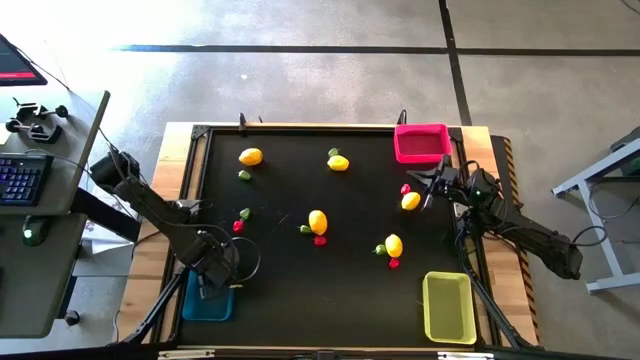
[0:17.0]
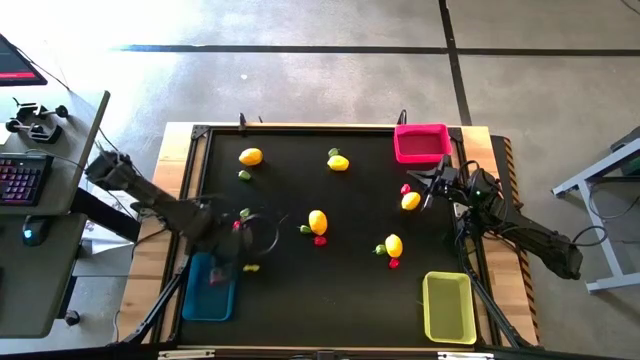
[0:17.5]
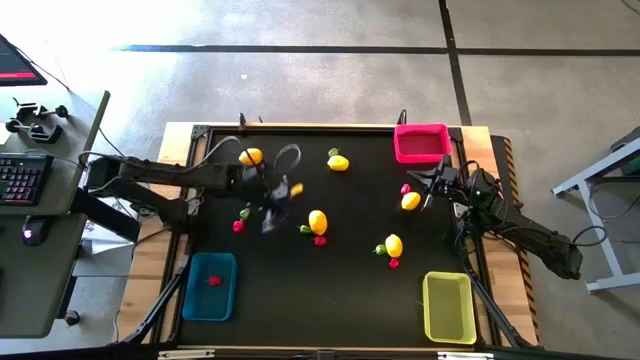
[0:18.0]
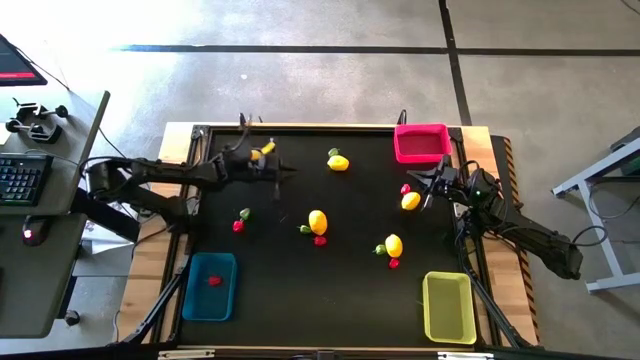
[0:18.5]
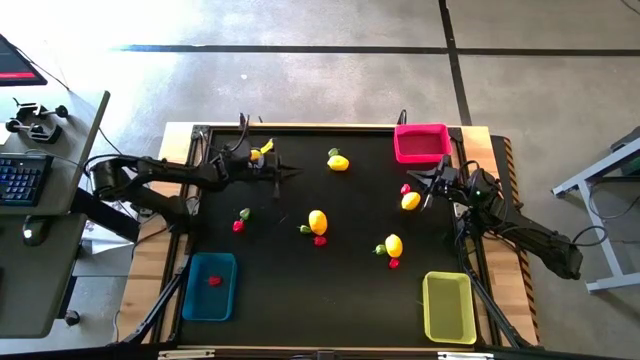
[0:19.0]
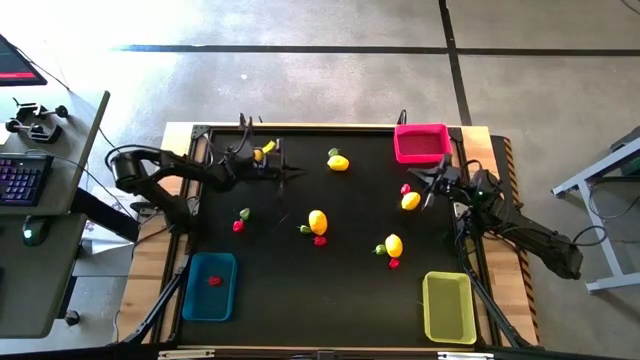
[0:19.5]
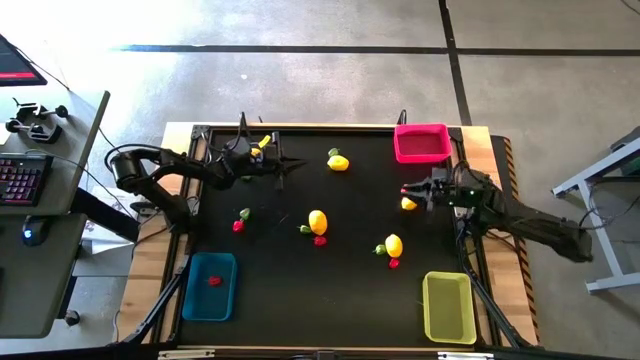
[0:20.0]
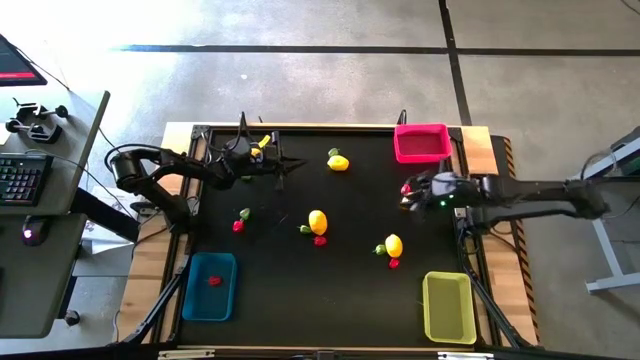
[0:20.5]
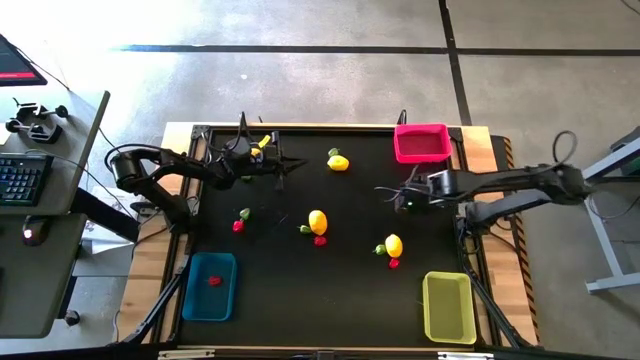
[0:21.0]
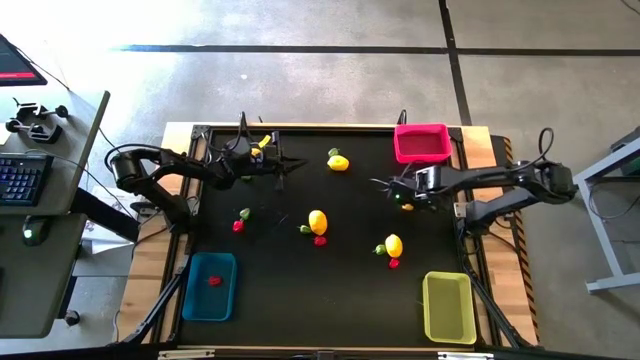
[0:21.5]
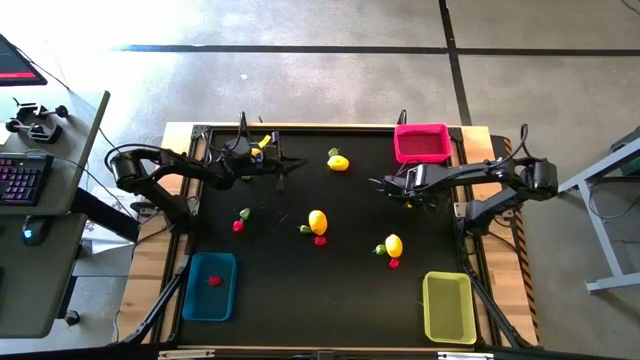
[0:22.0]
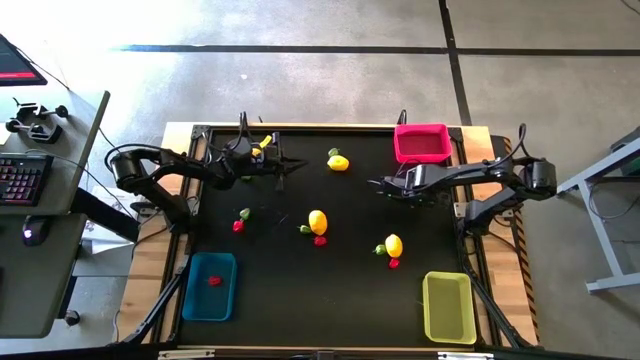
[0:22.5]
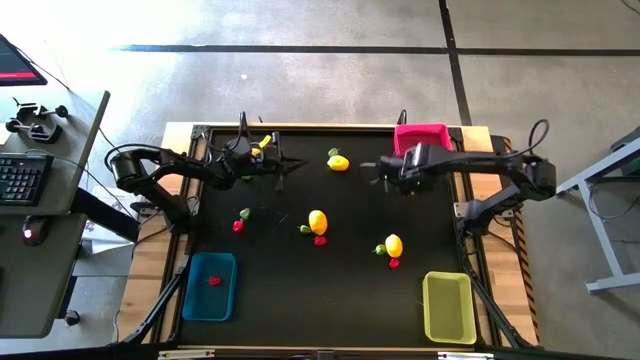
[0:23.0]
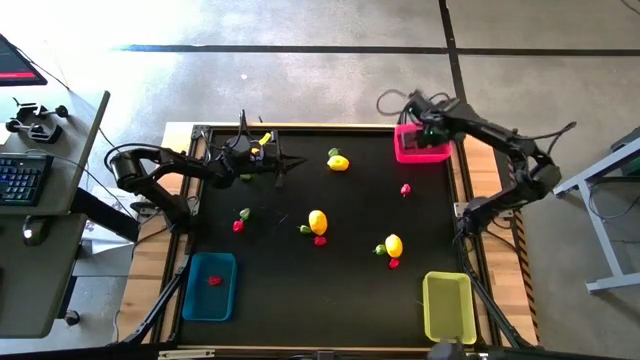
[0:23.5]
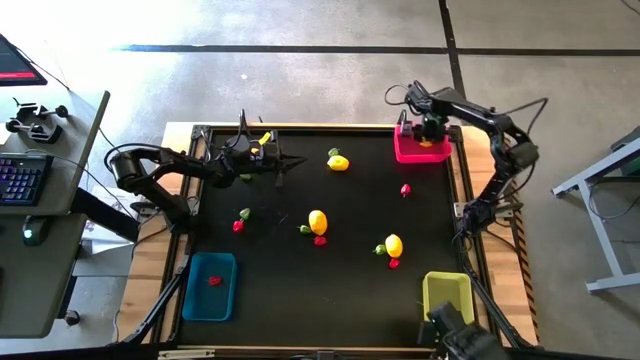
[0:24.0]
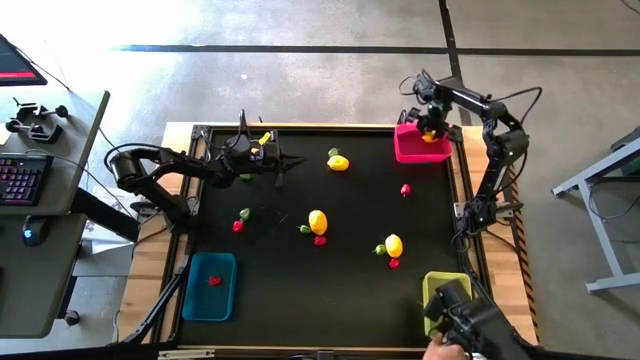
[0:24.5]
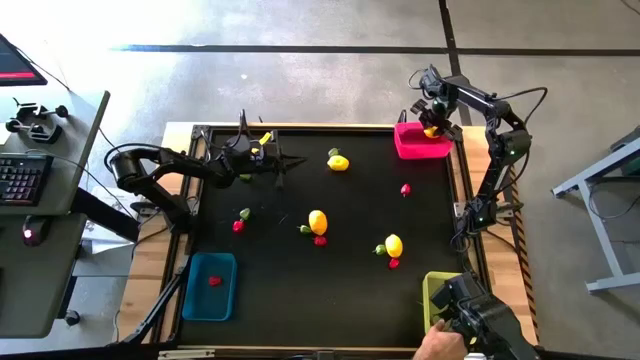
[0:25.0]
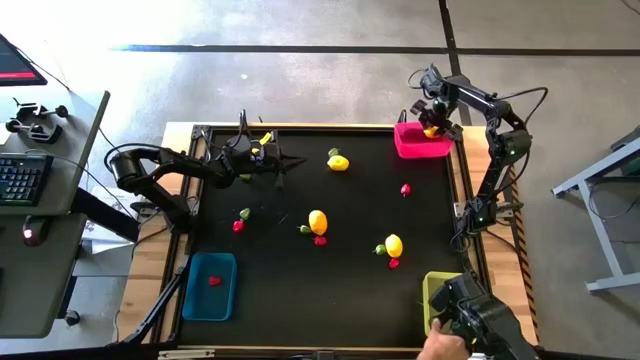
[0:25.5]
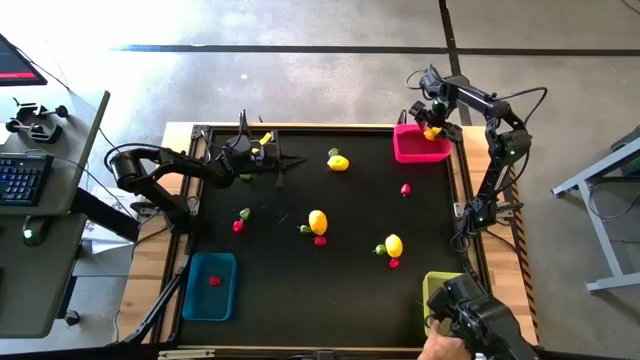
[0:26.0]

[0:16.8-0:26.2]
Task: Sort produce into baskets
Put the lemon into the pink bin

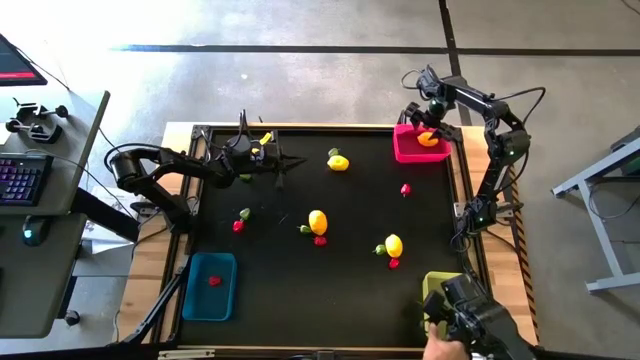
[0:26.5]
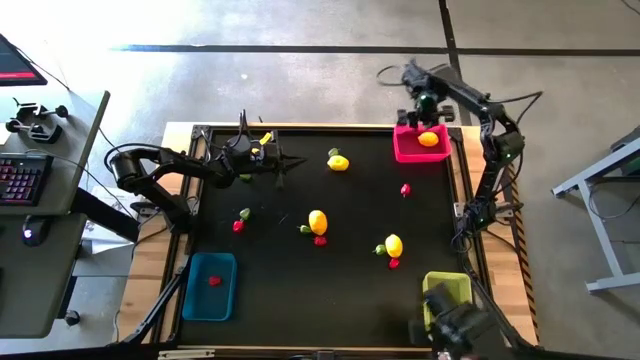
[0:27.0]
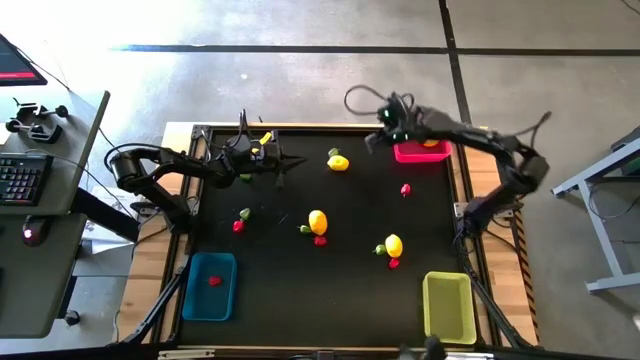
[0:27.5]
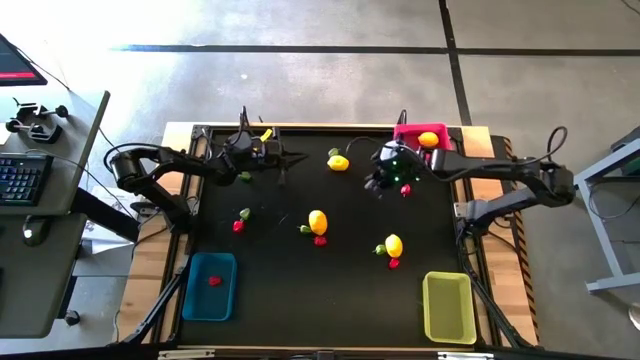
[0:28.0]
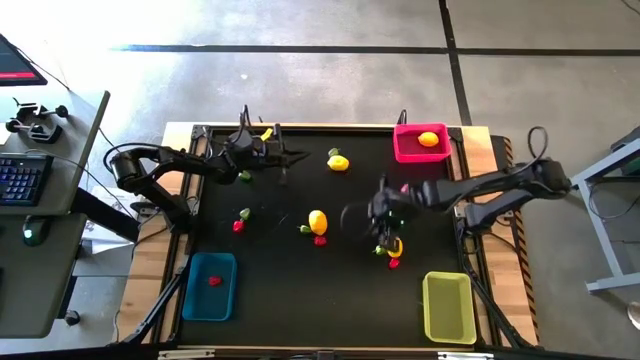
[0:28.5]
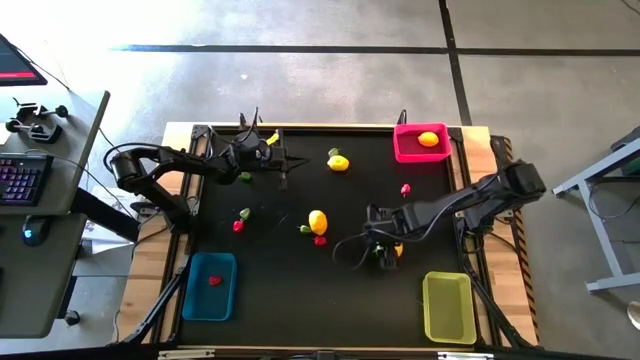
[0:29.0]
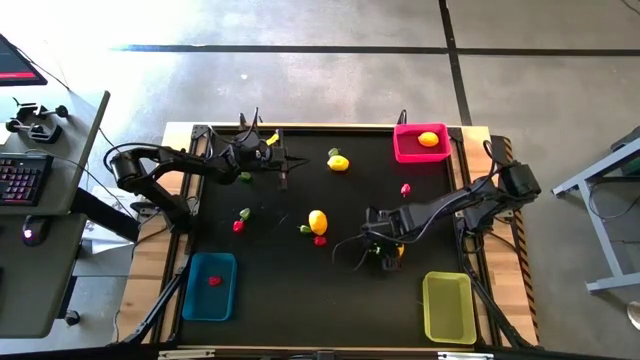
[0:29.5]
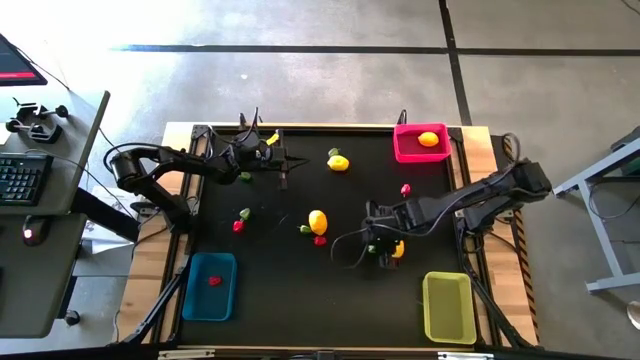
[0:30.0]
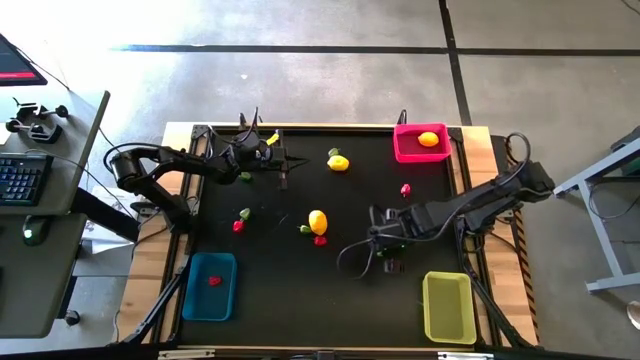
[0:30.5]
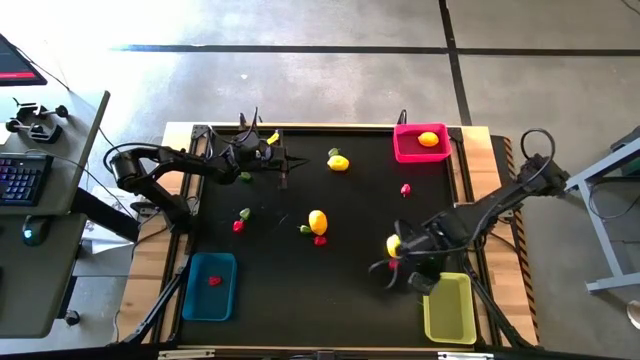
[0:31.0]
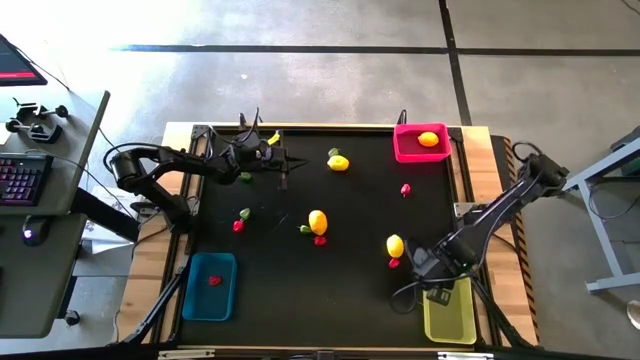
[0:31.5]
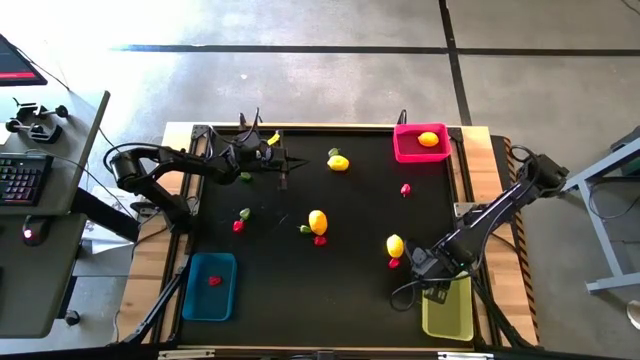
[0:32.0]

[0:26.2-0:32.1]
Put the green chilli pepper into the yellow bin

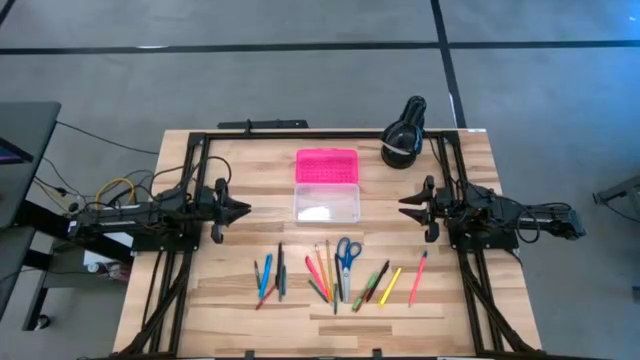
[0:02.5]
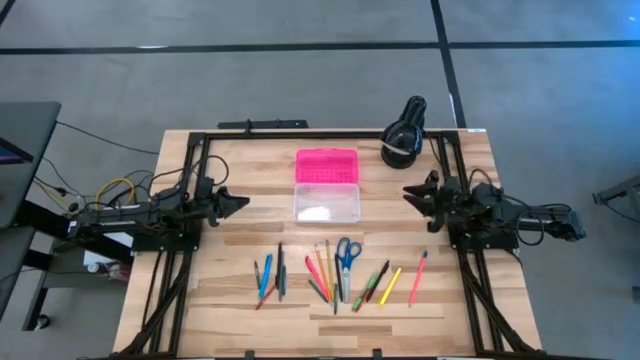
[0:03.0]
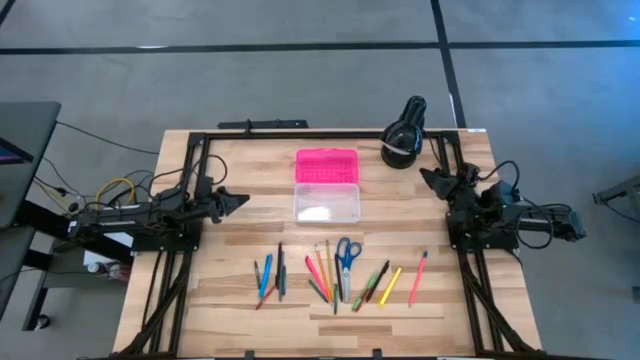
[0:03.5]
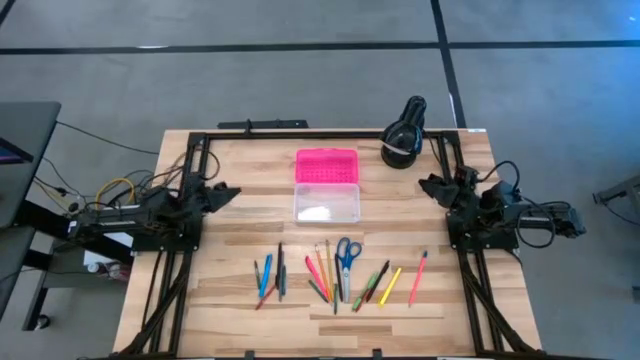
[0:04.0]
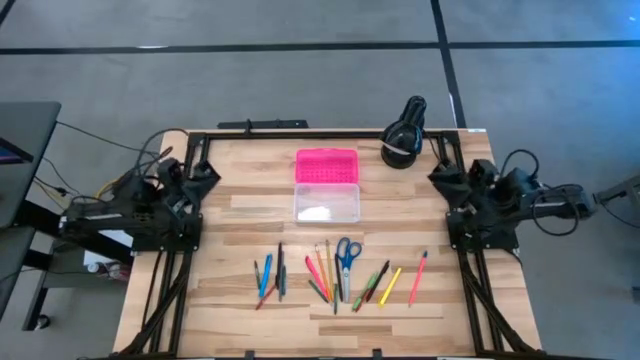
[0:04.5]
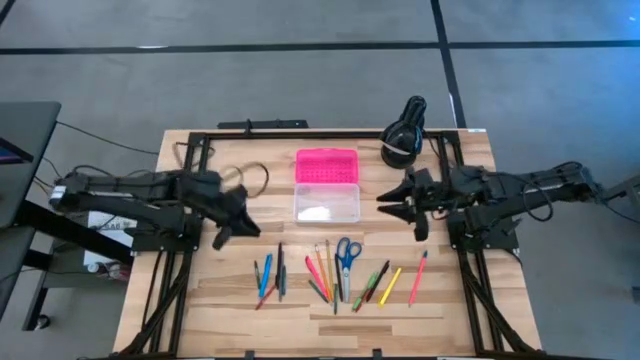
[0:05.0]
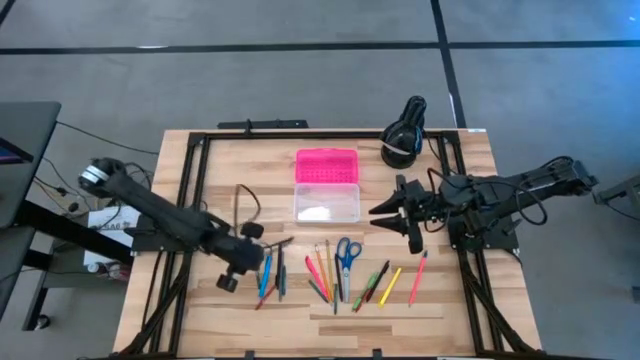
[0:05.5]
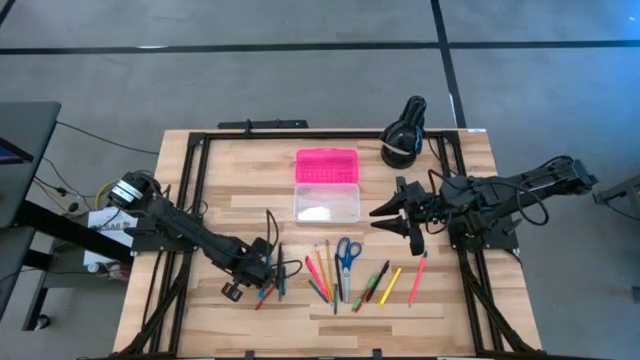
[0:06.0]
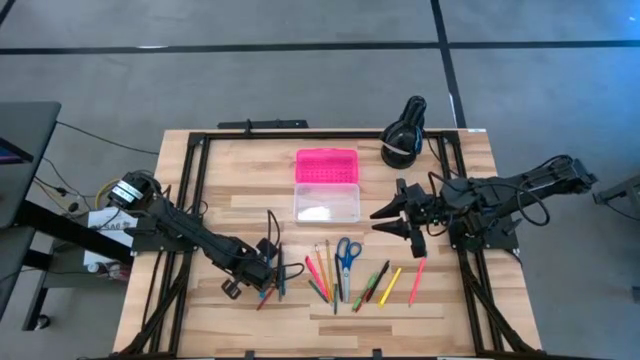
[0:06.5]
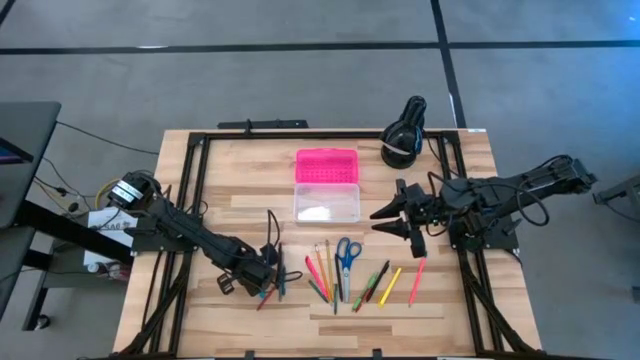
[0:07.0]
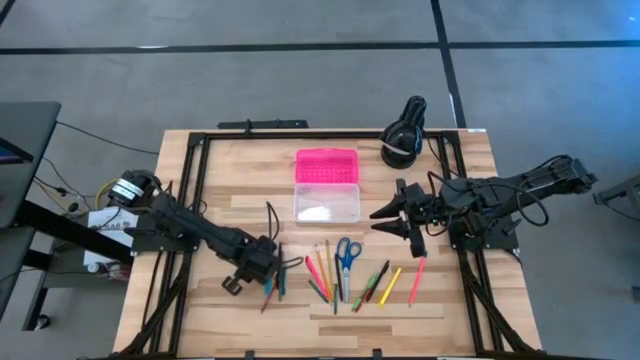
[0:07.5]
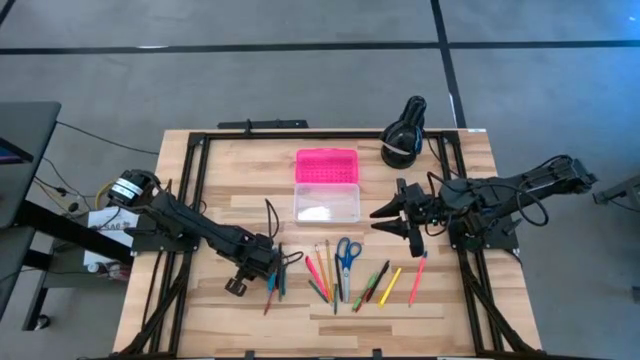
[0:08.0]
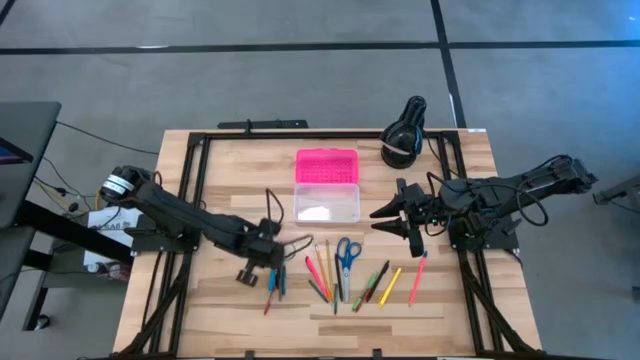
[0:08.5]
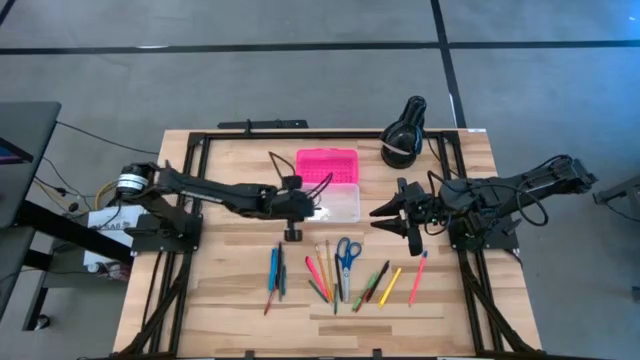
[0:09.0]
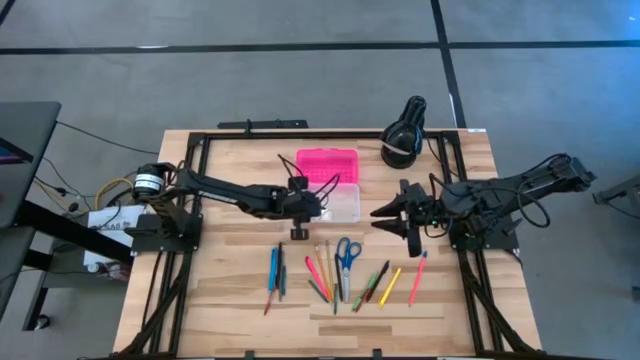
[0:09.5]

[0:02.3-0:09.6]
Task: Pick & place school supplies into a supply box
Put the green crayon into the pink supply box
